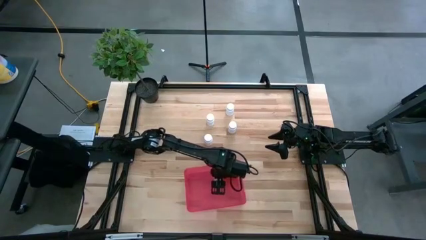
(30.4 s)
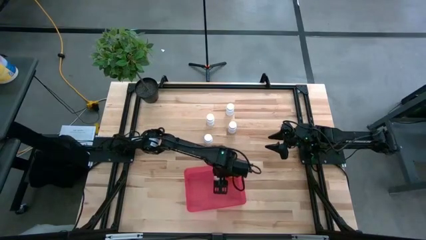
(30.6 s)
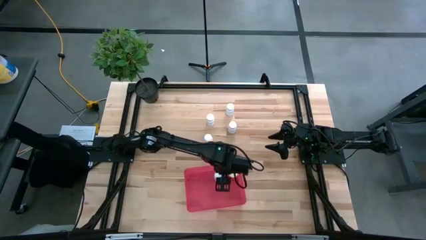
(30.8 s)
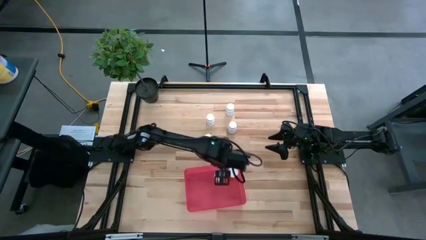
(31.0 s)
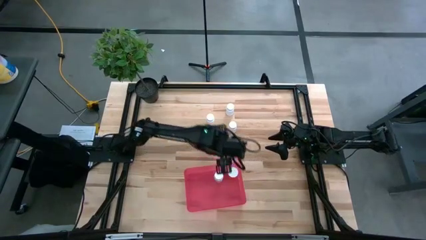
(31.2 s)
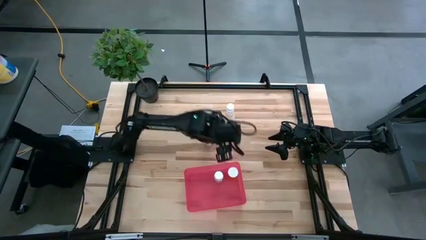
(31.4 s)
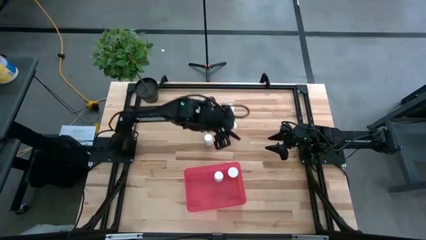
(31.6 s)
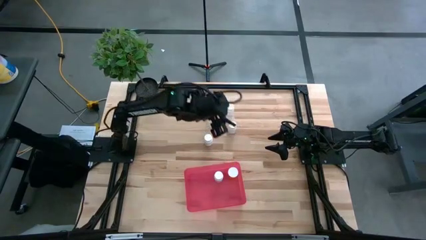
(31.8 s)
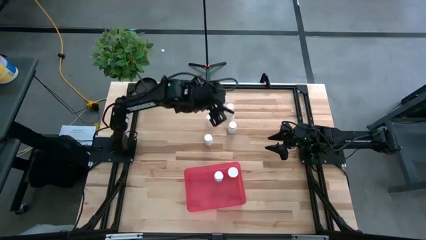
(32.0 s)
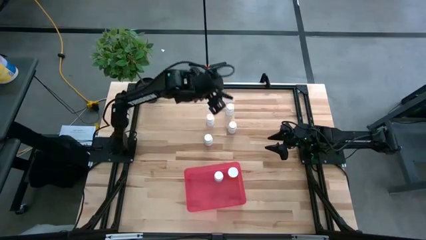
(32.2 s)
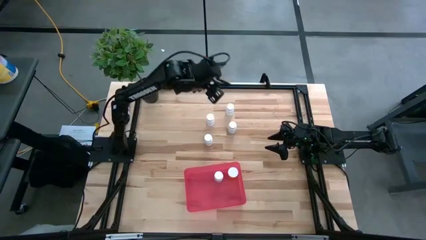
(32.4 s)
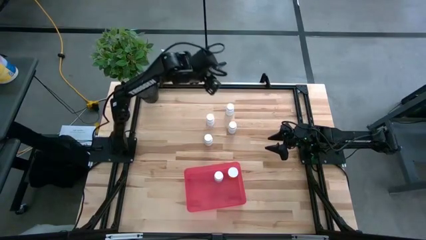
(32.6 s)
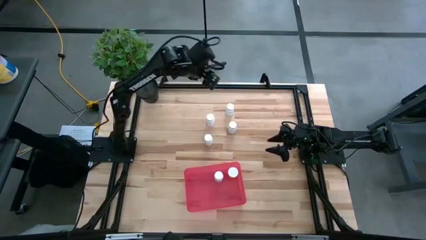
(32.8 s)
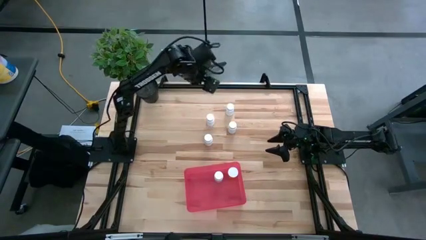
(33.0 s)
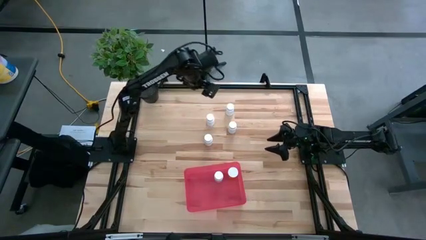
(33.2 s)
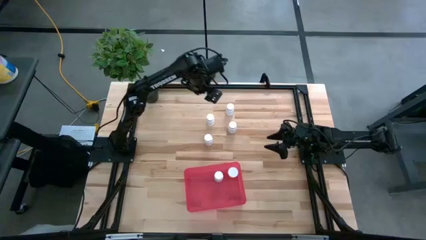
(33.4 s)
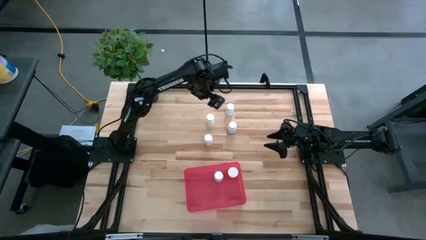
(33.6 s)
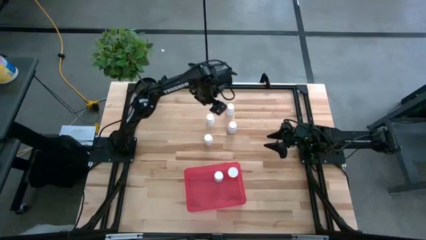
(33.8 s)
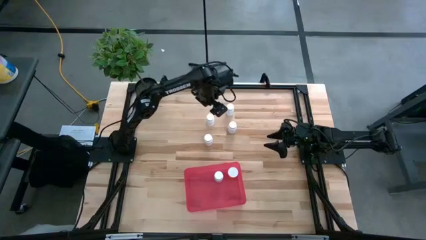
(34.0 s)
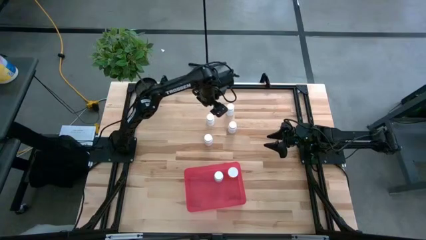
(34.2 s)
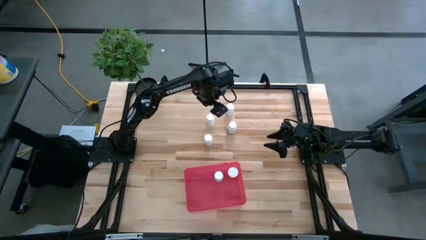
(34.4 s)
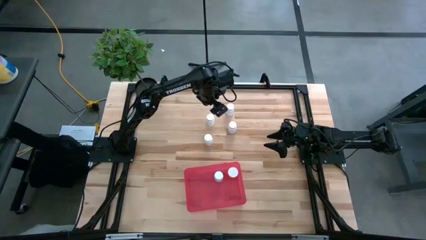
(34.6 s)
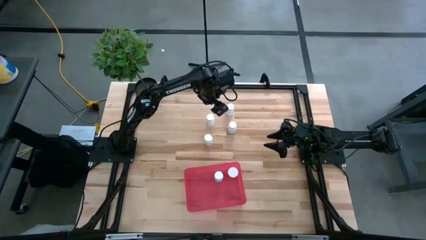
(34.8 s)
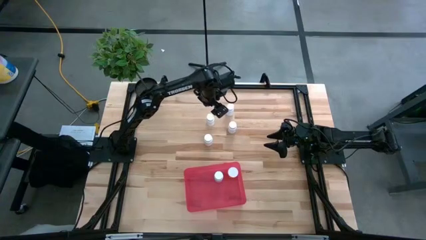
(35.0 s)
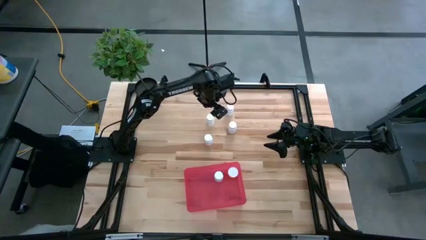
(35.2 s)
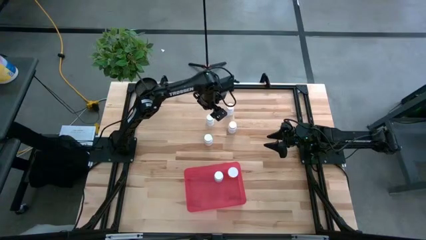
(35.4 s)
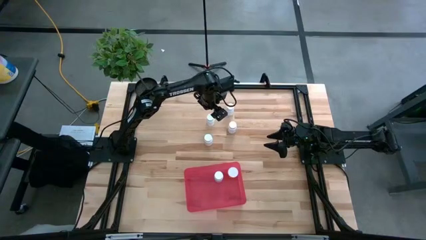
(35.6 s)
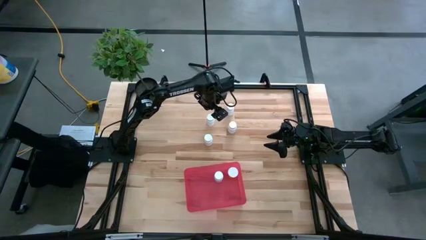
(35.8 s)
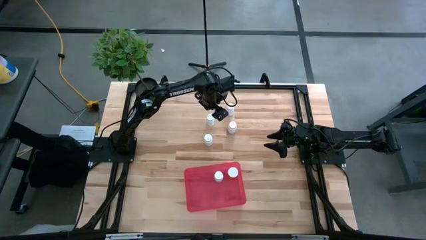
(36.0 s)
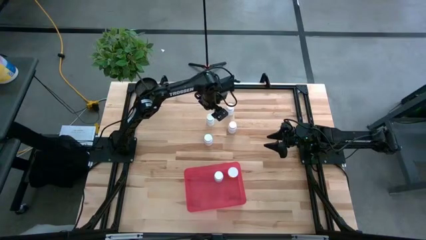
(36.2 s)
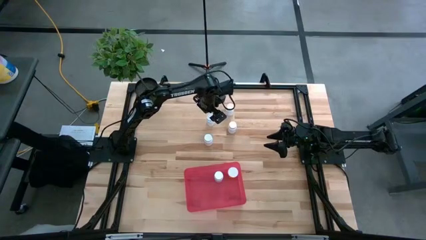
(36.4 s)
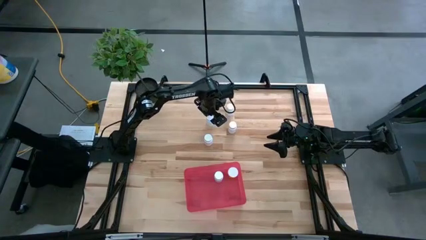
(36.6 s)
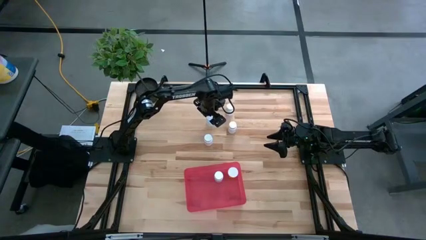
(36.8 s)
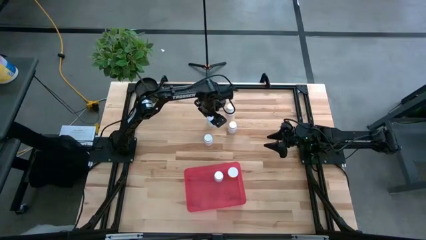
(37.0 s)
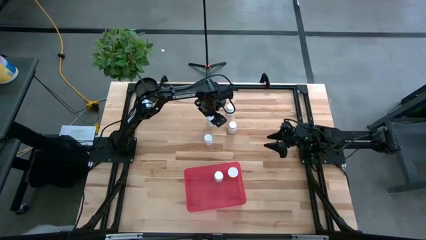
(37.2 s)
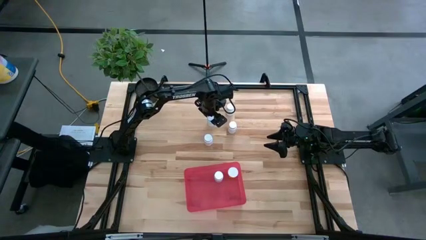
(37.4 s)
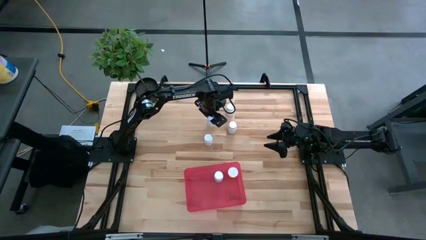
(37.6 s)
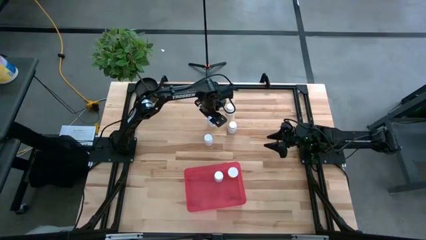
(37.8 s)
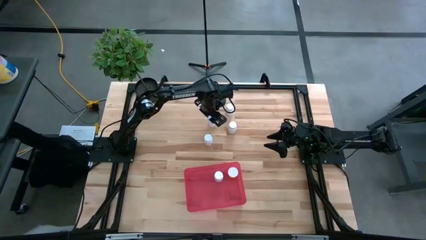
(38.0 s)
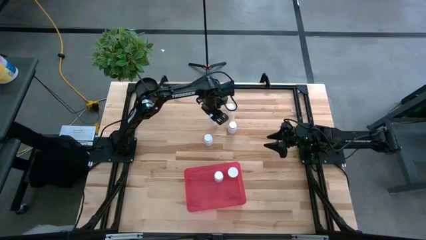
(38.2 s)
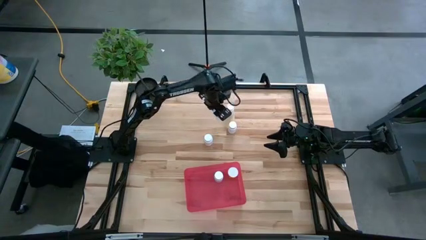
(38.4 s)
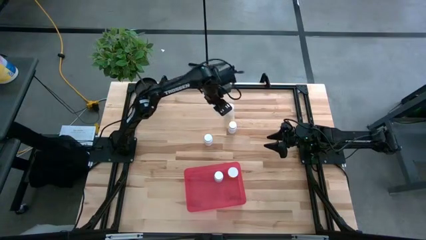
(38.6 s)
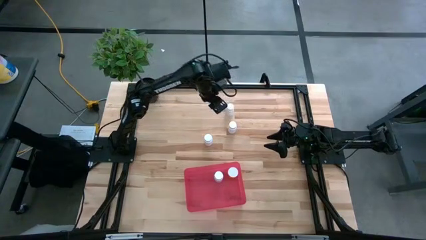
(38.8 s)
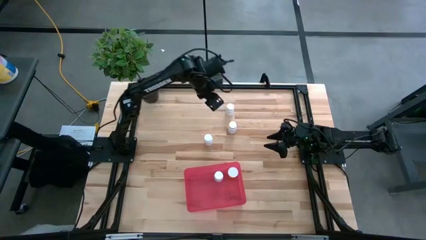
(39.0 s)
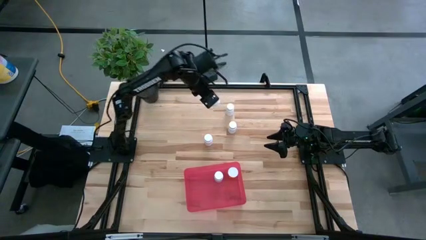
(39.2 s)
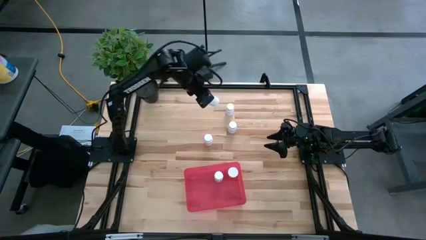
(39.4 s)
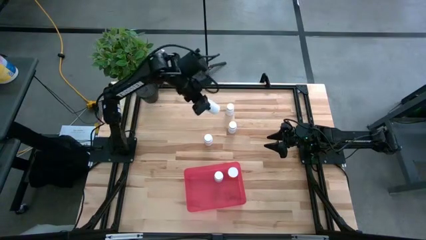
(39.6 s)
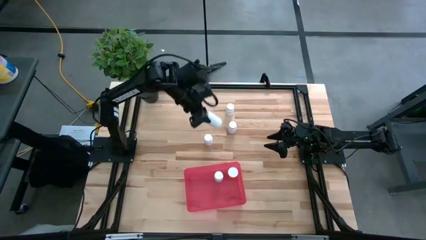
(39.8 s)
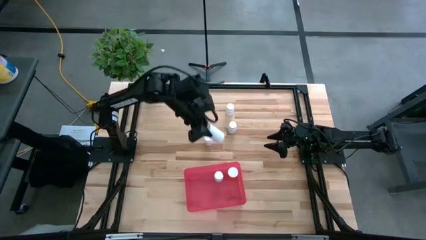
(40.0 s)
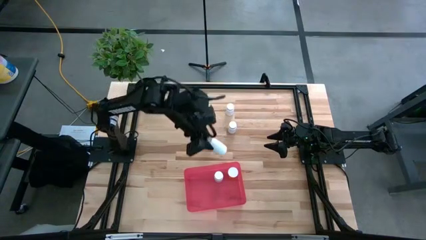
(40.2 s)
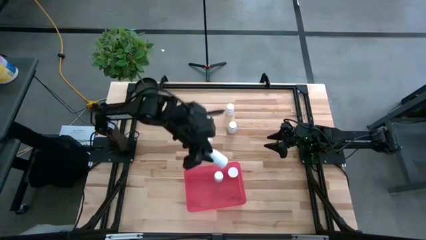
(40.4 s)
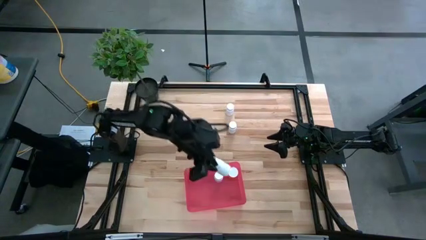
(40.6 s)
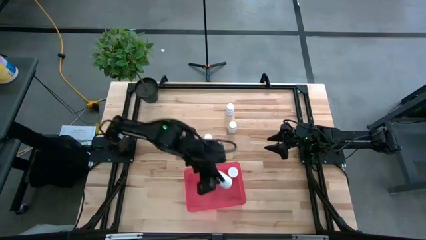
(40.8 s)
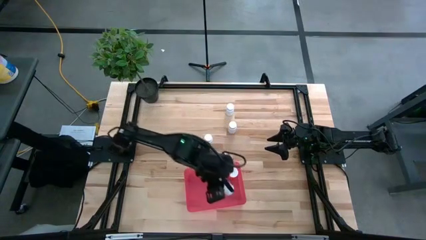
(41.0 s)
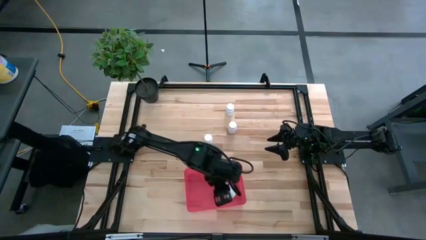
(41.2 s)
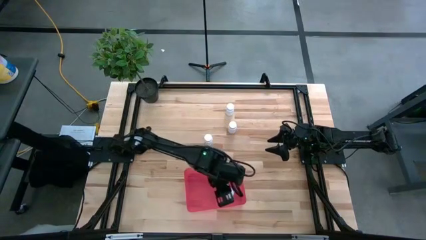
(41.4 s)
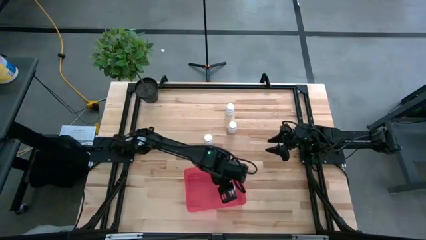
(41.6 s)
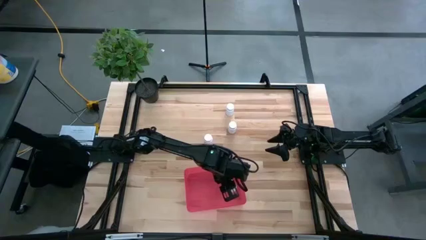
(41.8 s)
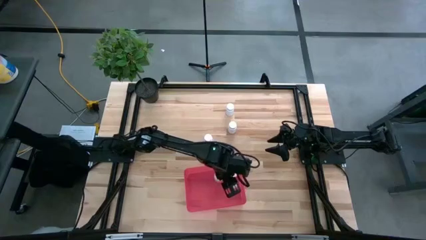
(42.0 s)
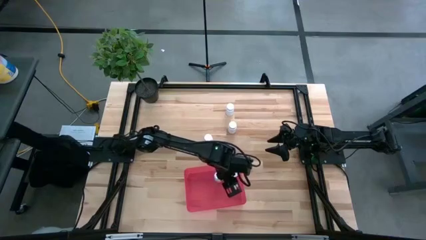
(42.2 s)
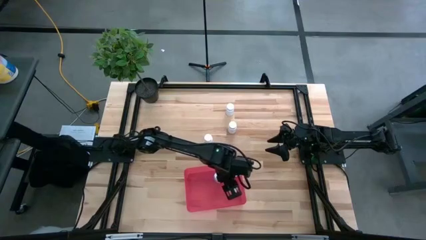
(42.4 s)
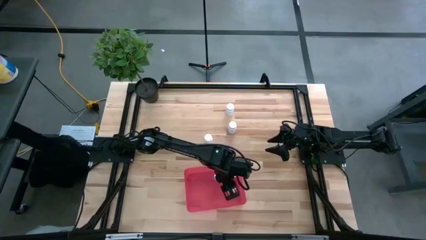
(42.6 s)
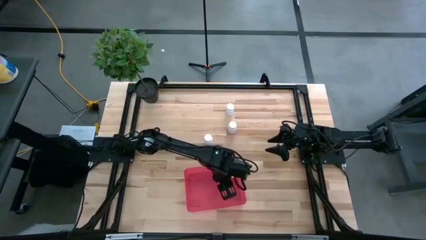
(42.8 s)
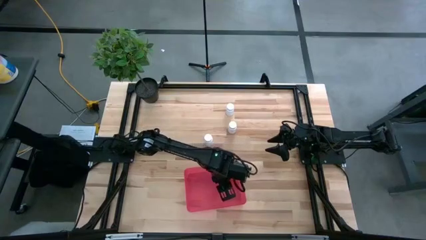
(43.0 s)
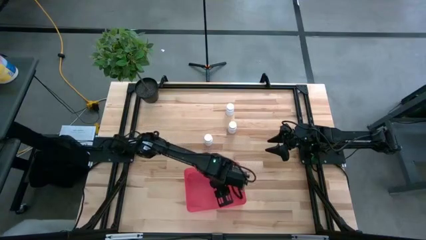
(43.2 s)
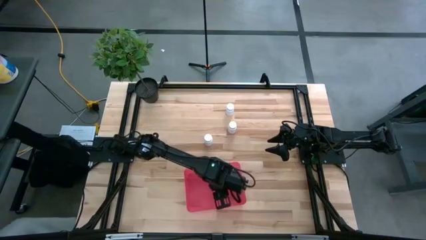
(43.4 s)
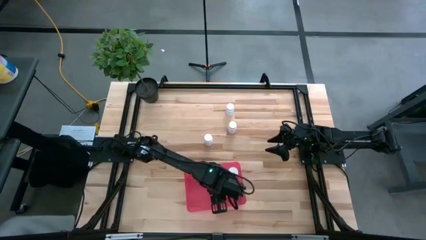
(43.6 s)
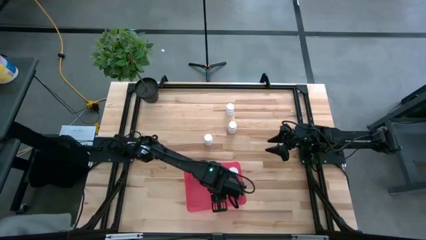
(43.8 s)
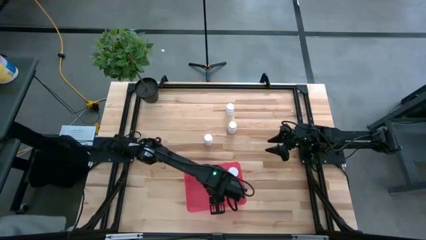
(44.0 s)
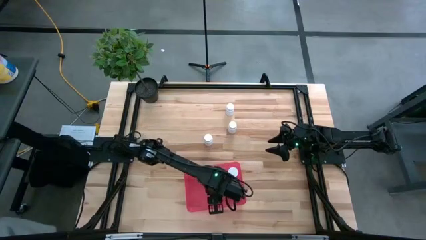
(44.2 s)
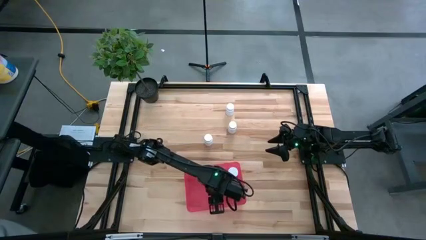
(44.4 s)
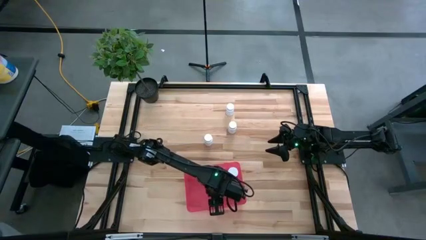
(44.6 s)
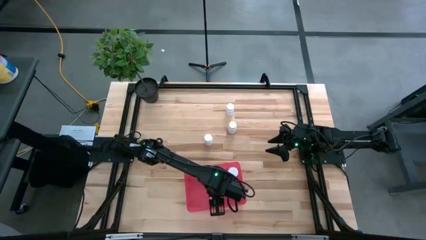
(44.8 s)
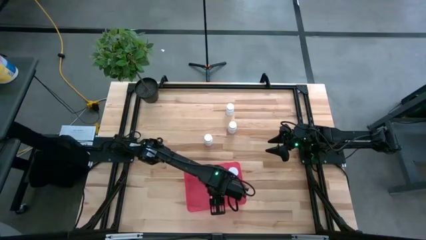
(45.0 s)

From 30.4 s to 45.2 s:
Task: Pick and place pill bottles into a basket
Put the white pill bottle into the red bin

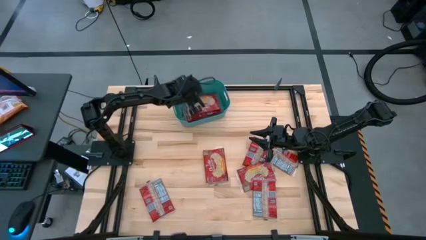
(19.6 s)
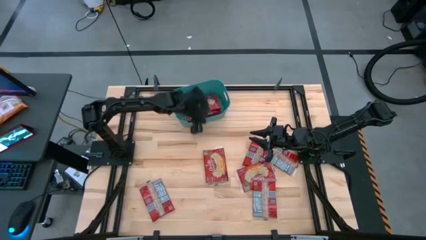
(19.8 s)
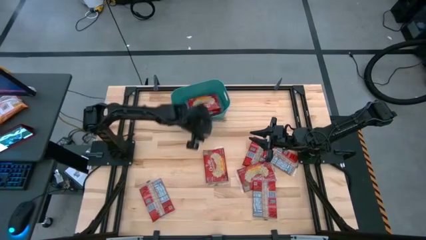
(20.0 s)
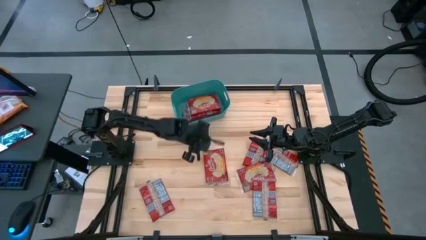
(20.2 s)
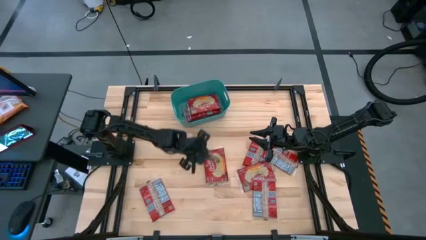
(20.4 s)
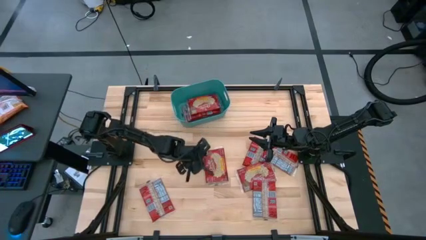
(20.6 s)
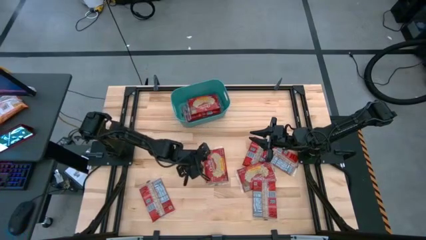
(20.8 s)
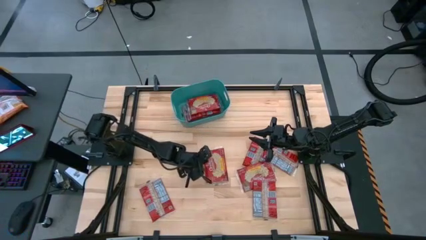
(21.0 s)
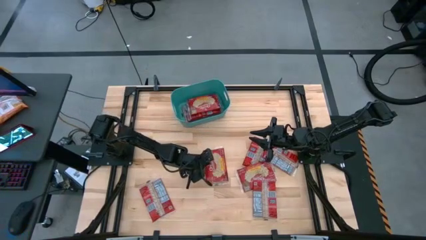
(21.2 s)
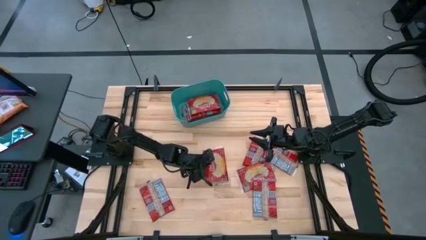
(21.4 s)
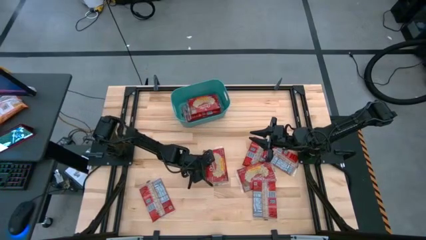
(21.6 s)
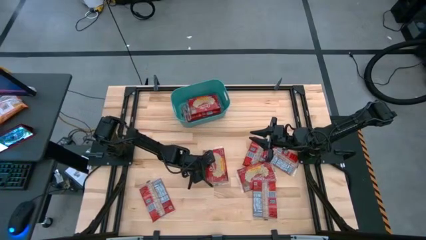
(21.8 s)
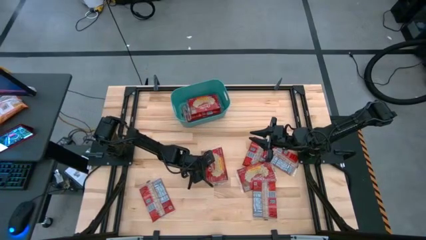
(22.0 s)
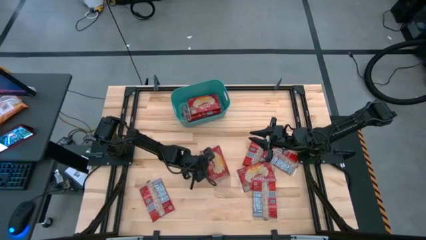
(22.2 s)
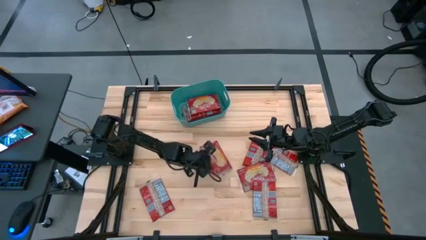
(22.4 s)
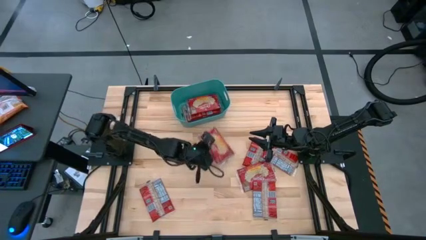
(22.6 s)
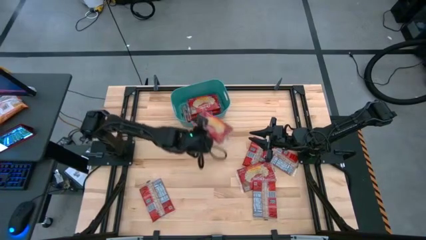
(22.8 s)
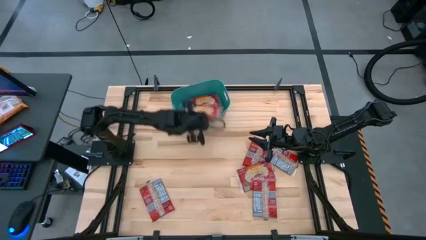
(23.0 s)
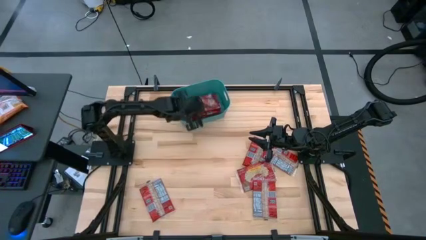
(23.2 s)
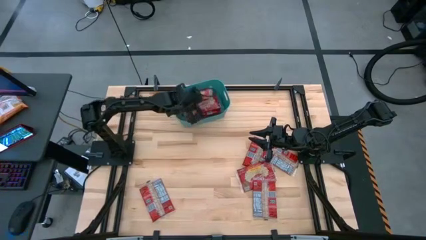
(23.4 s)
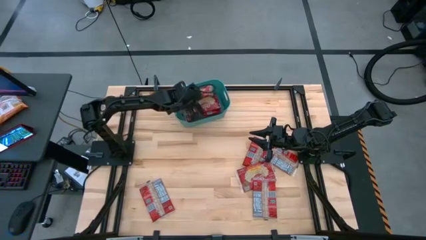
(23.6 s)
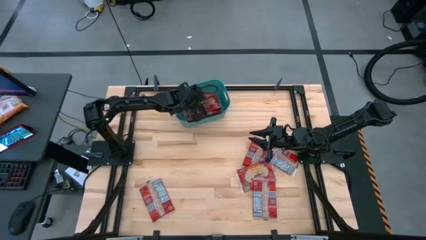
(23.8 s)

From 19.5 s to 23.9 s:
Task: Sort popcorn bags into baskets
Put the red popcorn bag into the green bin
